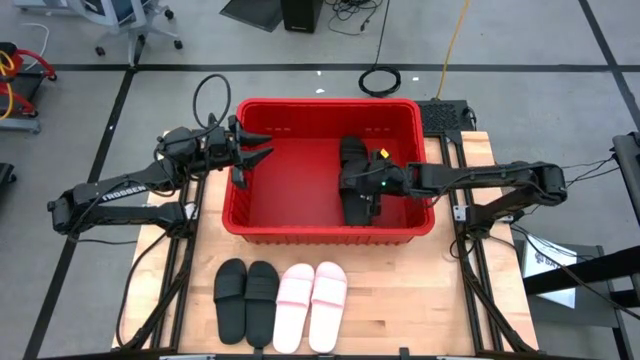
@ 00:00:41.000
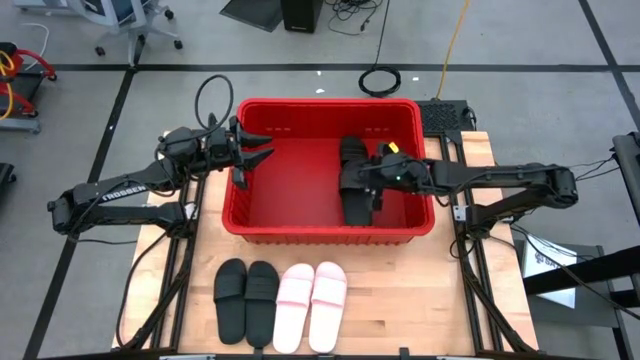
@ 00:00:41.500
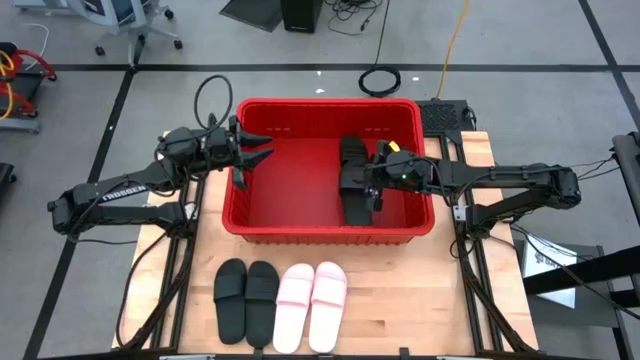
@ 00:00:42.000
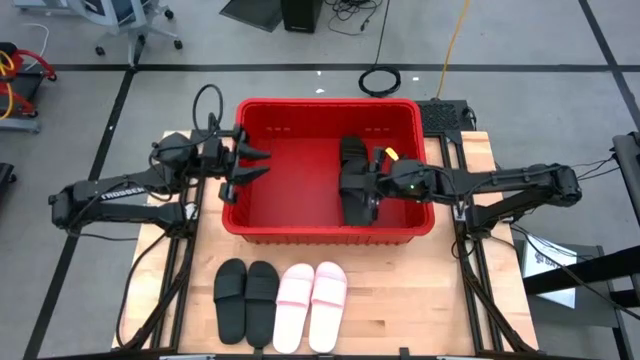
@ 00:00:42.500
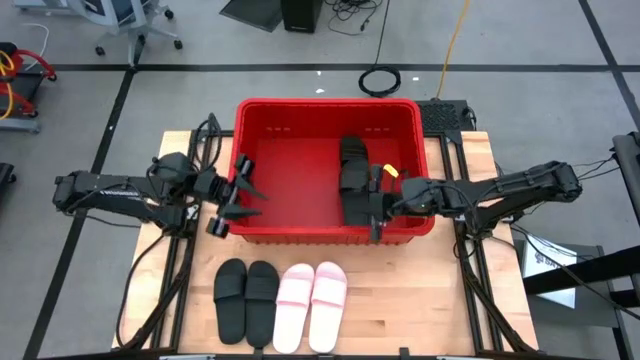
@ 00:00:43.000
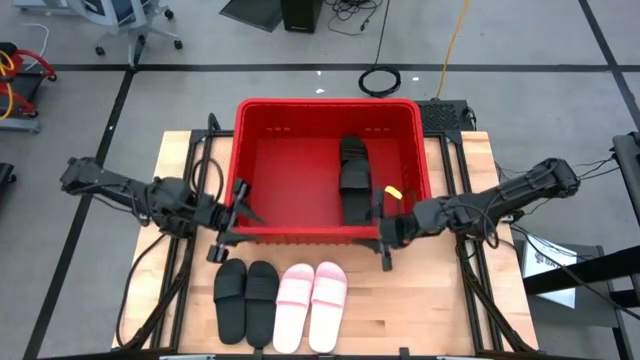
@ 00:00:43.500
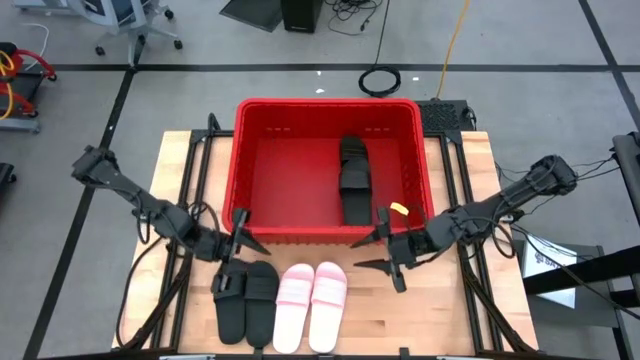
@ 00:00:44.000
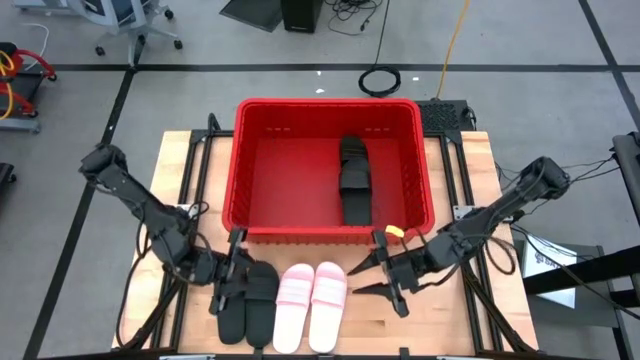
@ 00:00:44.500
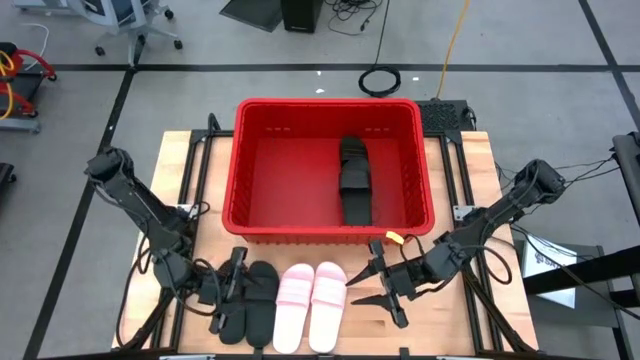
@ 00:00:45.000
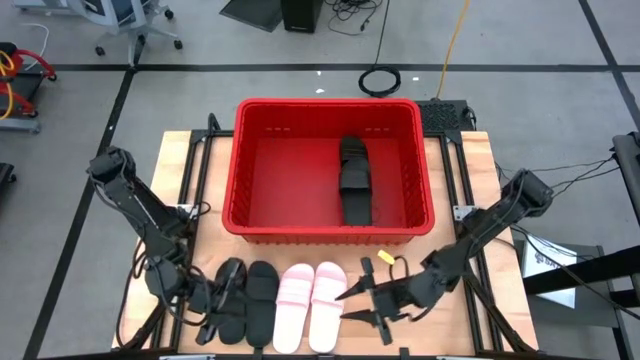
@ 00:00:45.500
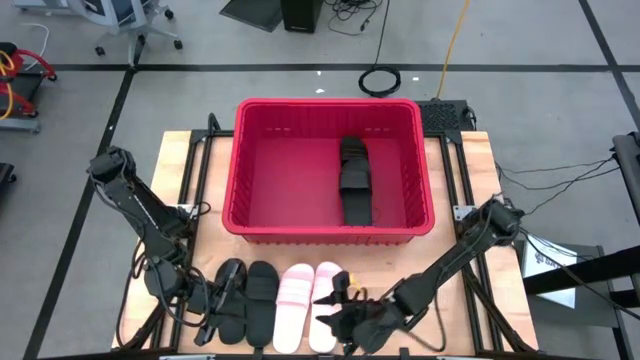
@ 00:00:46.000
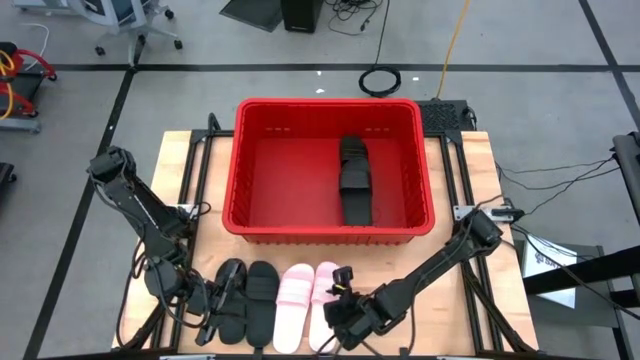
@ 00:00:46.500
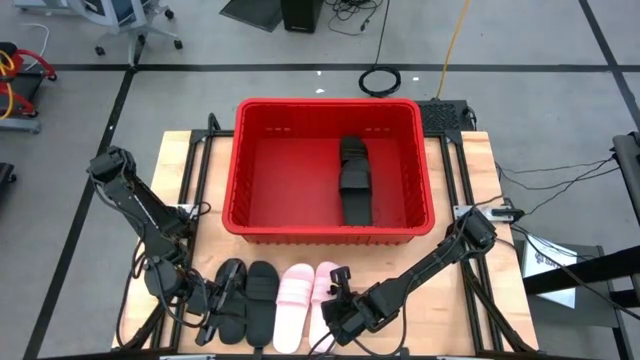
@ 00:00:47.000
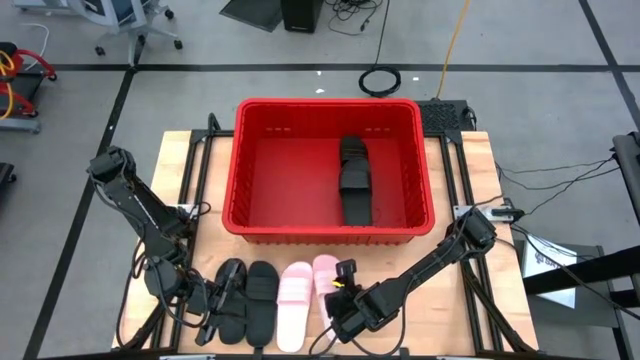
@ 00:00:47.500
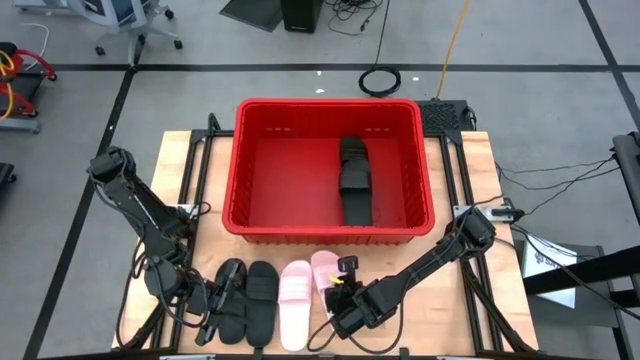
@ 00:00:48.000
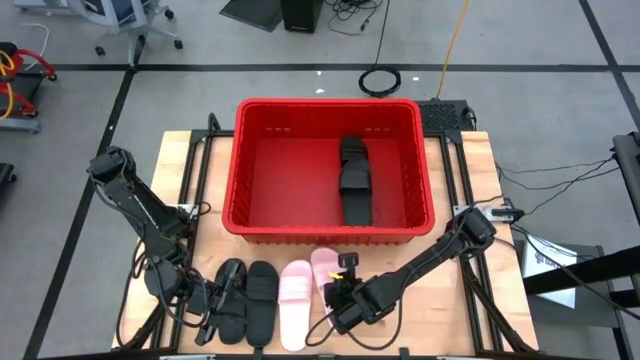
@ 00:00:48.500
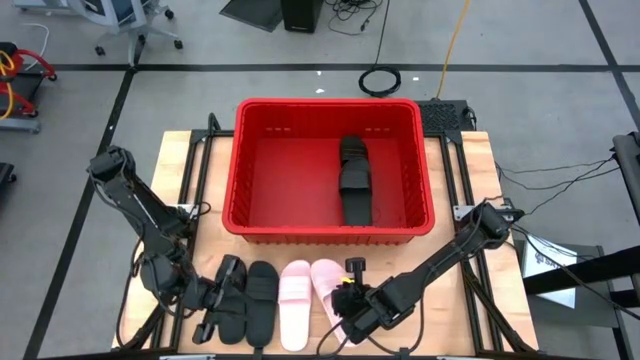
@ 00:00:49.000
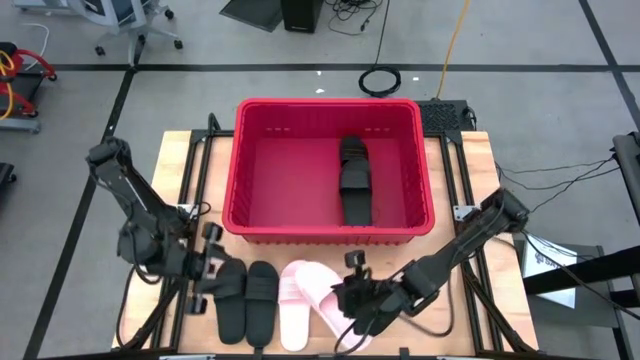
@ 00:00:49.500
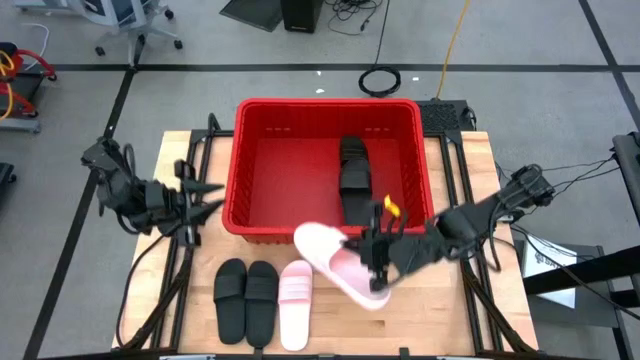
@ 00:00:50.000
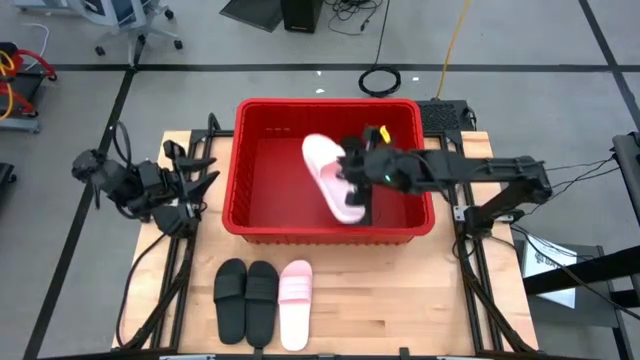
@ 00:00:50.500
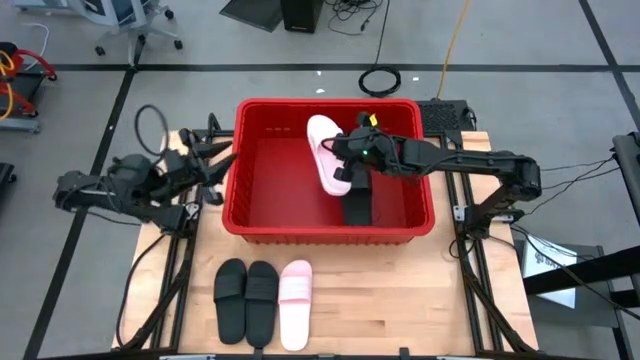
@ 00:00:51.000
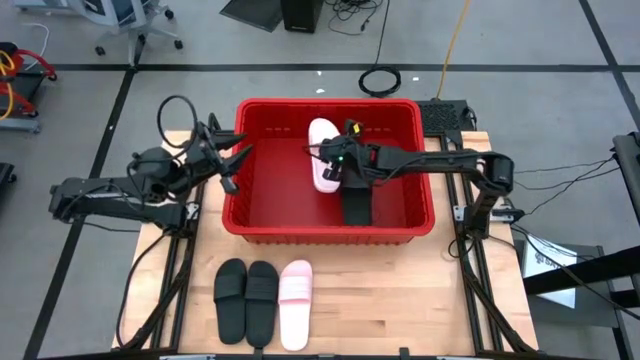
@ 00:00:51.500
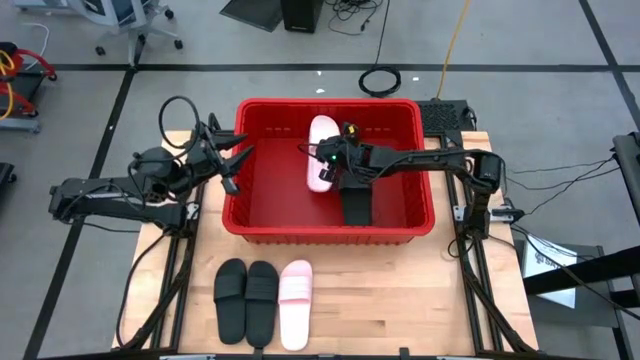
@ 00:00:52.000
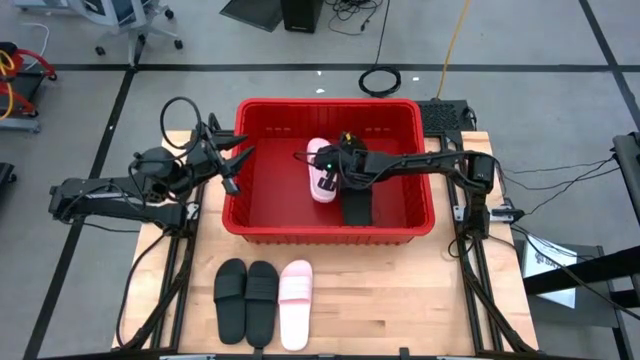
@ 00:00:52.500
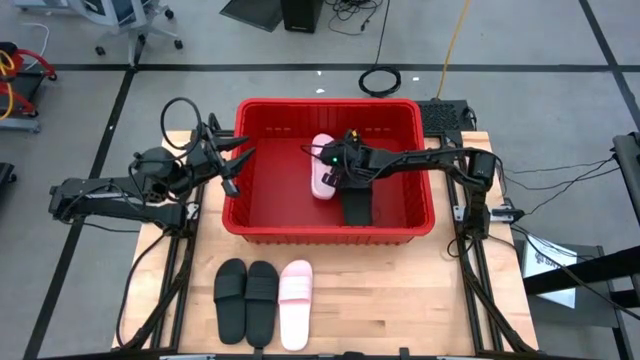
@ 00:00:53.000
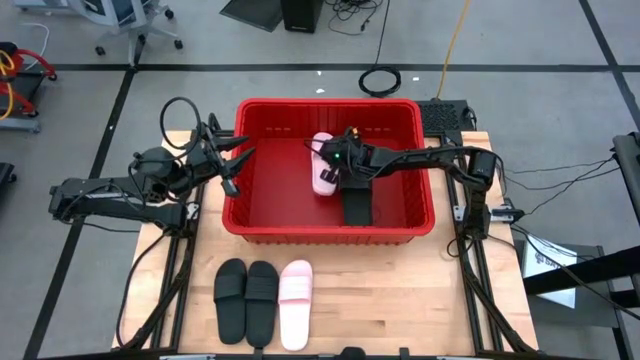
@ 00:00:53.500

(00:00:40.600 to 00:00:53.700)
Task: Pick and place slides into bin
Put the right pink slide into the red bin

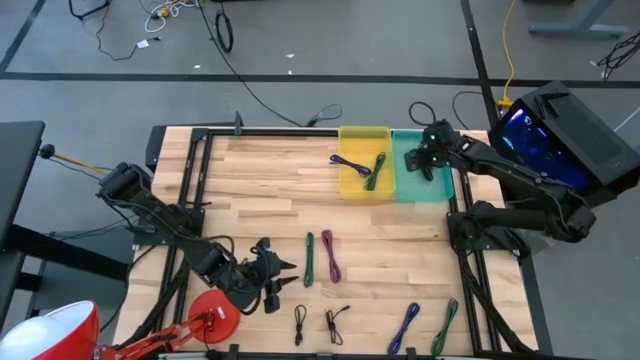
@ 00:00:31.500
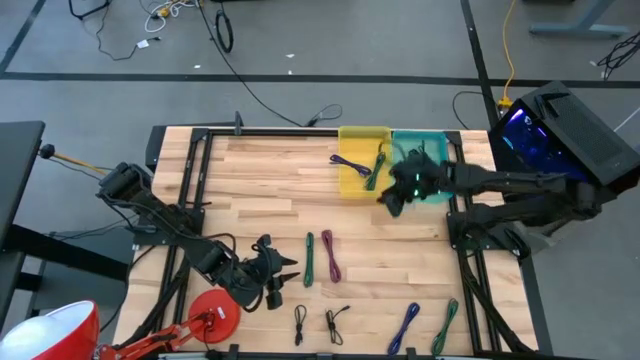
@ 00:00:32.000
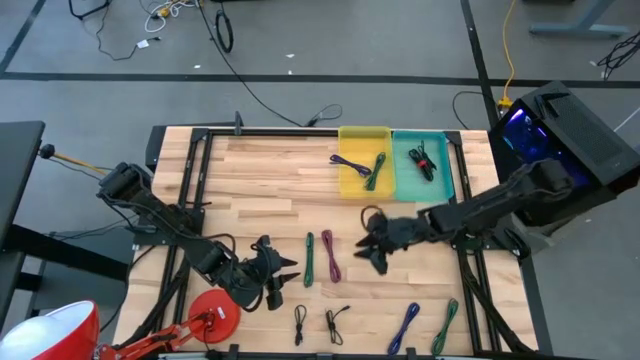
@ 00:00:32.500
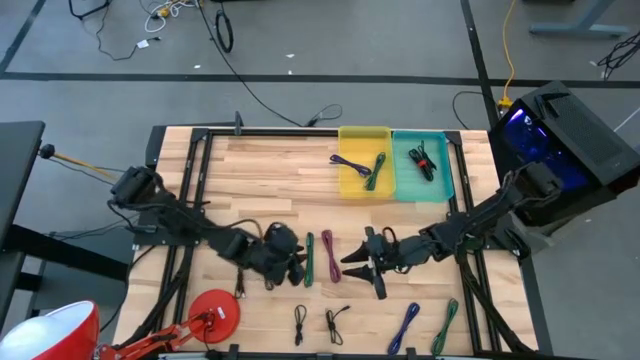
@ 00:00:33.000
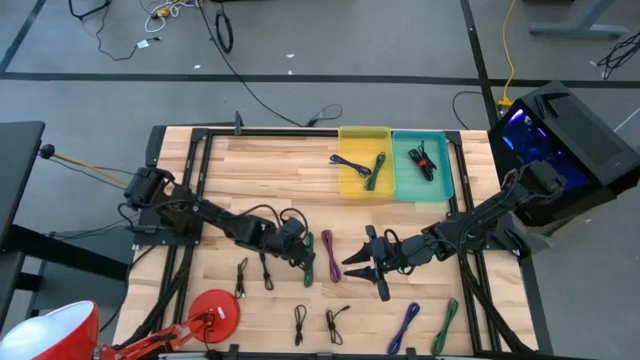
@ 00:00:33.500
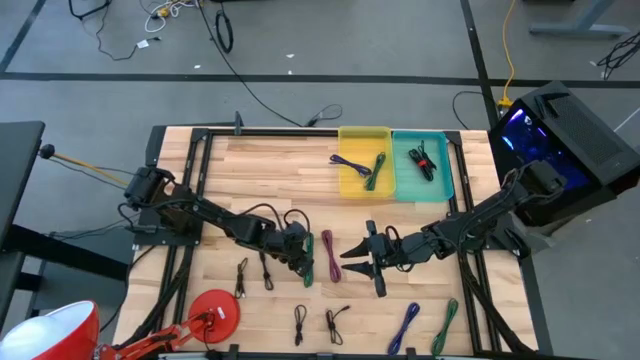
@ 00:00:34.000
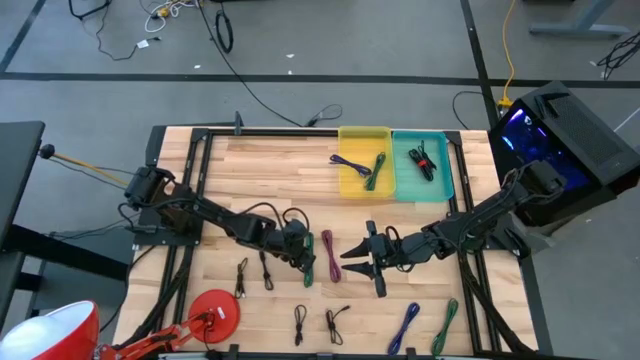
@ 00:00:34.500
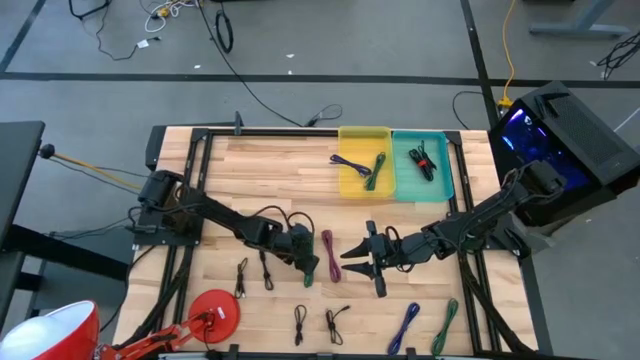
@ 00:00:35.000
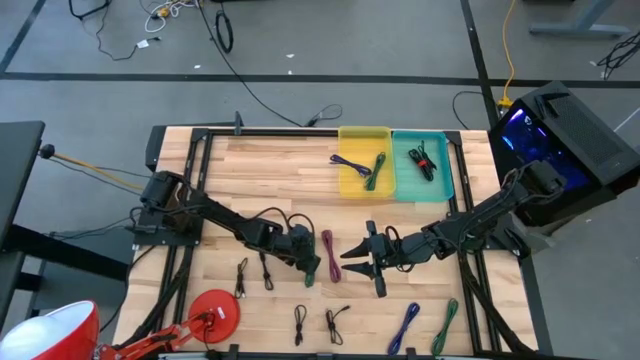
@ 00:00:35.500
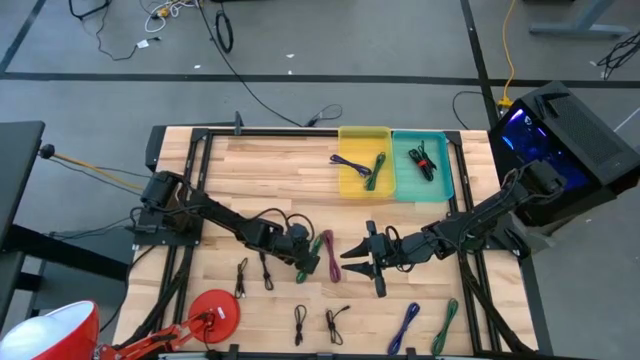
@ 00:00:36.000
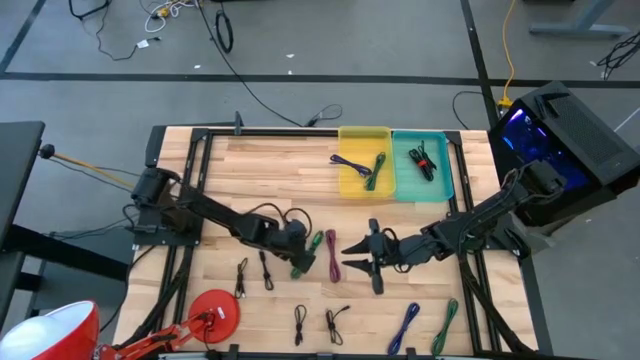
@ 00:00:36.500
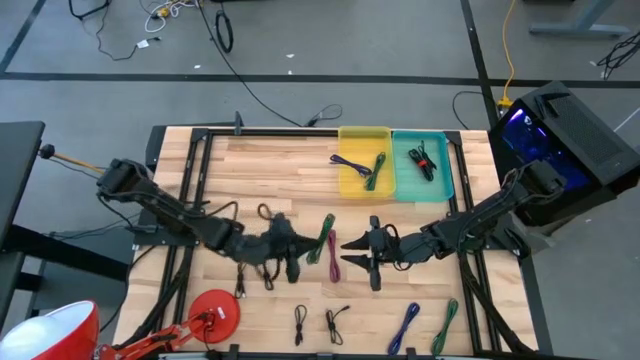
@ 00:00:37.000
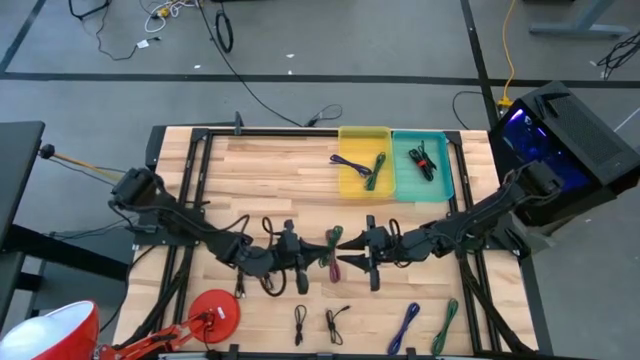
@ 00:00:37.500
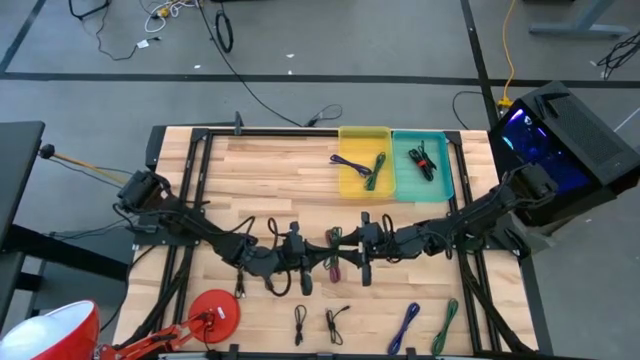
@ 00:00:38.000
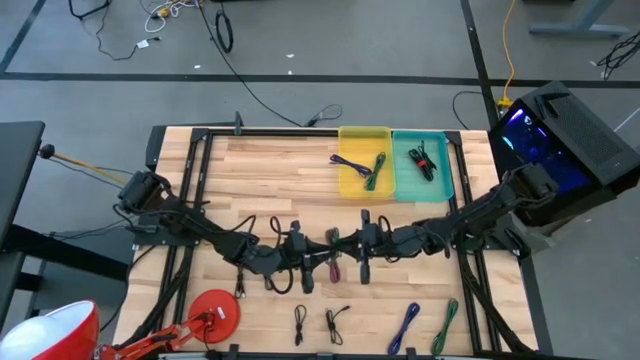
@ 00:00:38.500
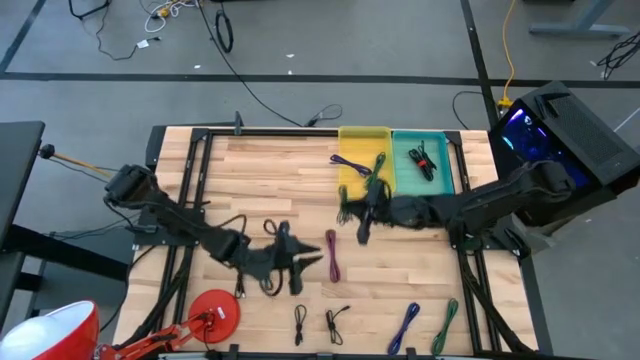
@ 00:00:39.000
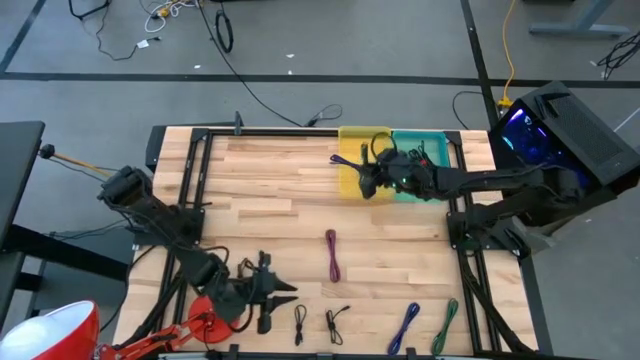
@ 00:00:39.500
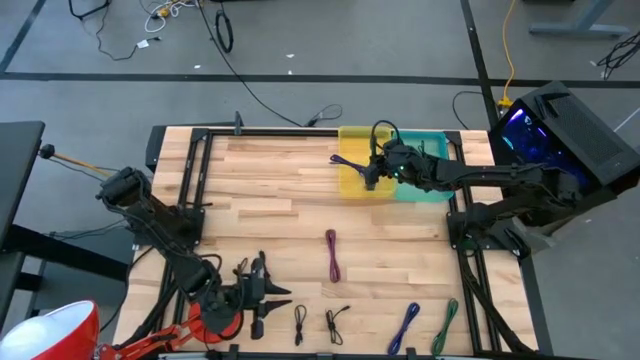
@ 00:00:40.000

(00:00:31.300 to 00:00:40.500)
Task: Pick & Place USB Port
Put the top green charger cable into the yellow bin
